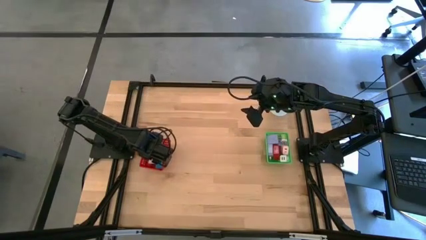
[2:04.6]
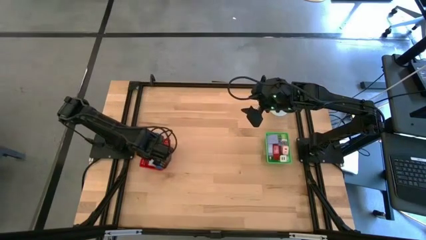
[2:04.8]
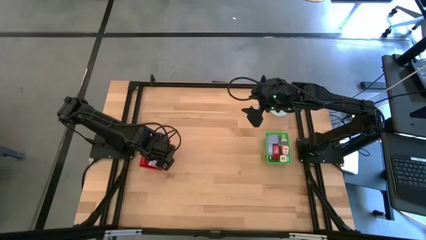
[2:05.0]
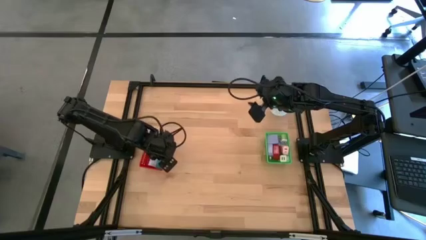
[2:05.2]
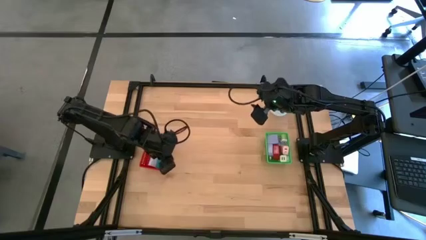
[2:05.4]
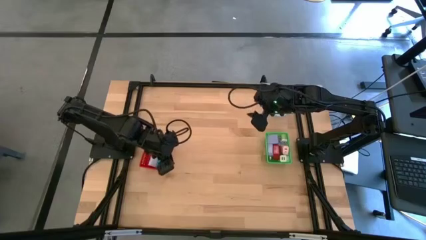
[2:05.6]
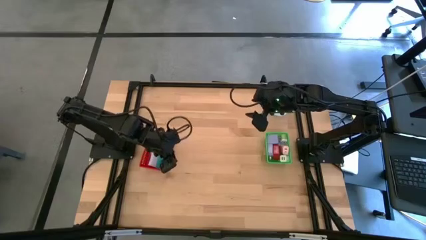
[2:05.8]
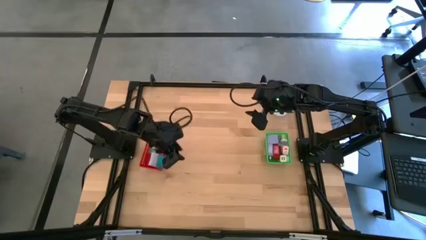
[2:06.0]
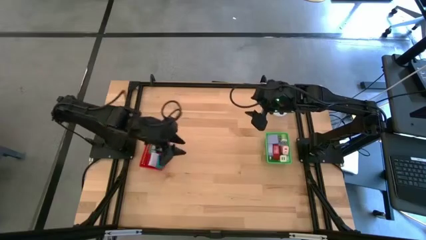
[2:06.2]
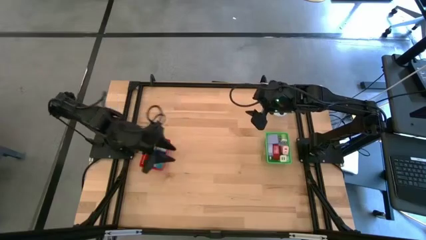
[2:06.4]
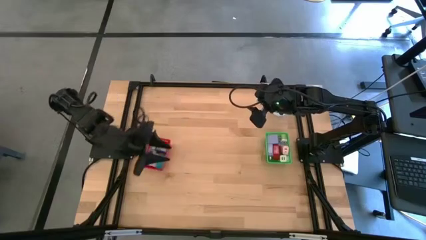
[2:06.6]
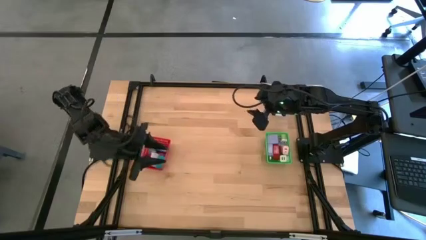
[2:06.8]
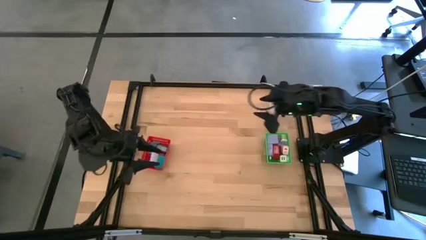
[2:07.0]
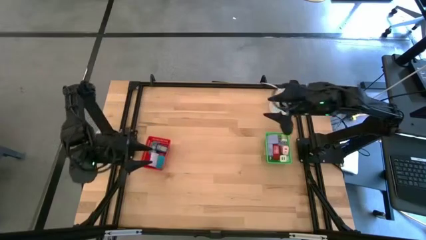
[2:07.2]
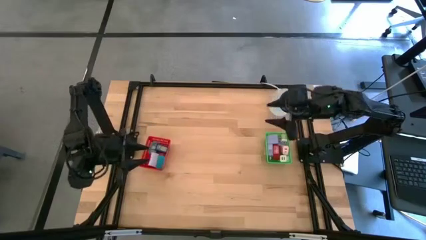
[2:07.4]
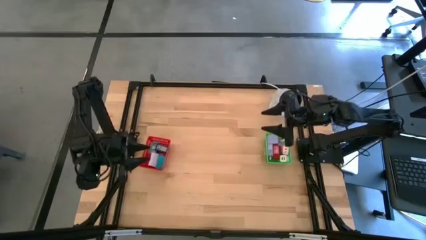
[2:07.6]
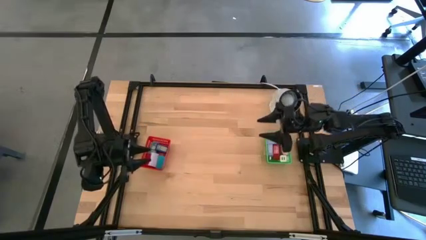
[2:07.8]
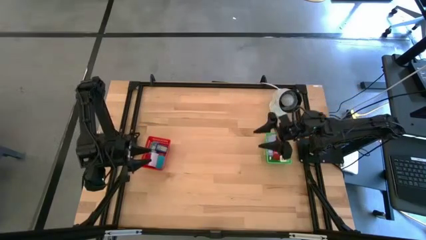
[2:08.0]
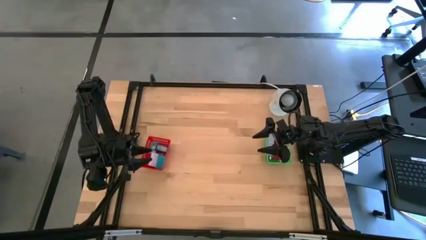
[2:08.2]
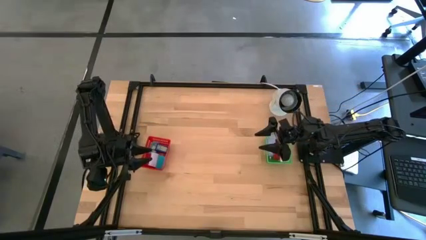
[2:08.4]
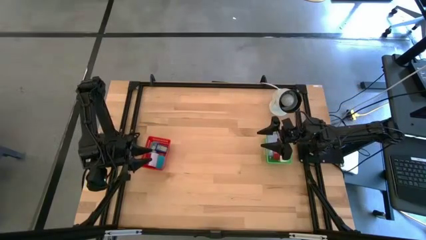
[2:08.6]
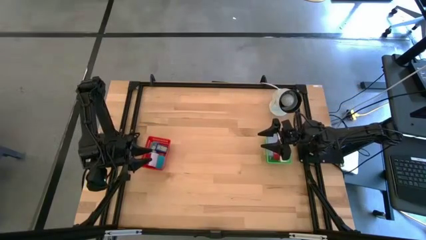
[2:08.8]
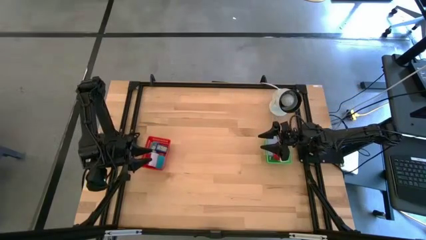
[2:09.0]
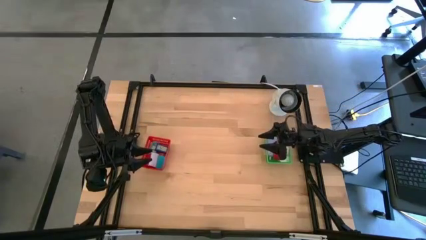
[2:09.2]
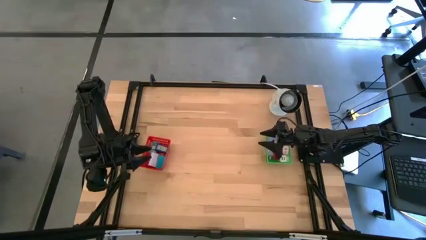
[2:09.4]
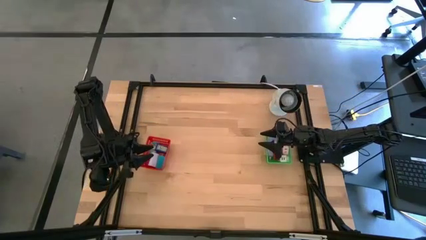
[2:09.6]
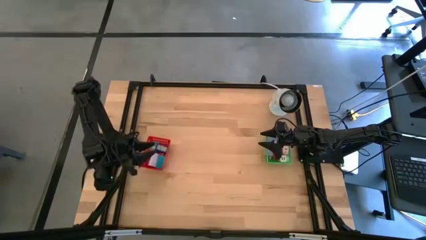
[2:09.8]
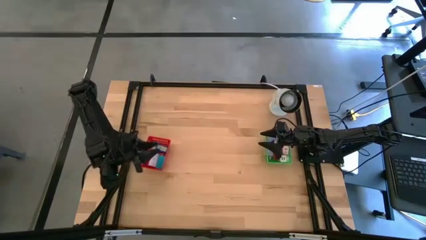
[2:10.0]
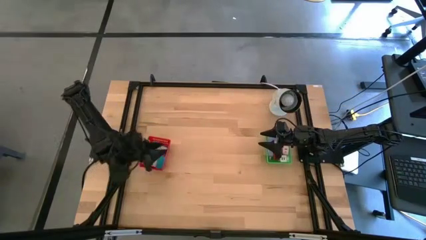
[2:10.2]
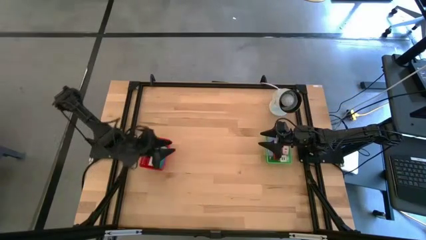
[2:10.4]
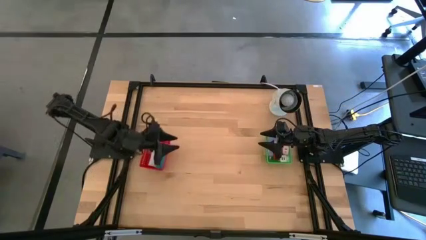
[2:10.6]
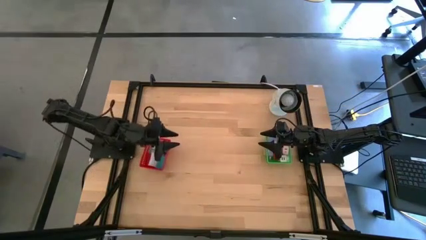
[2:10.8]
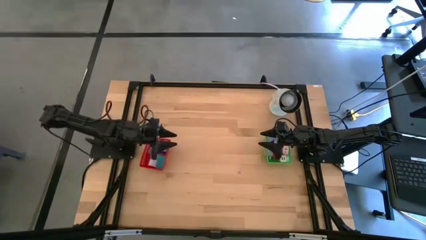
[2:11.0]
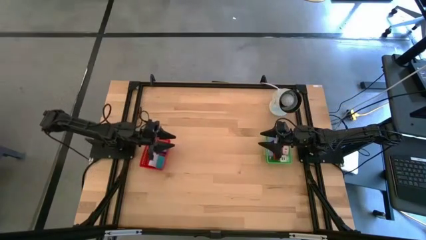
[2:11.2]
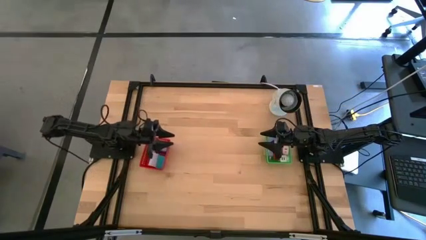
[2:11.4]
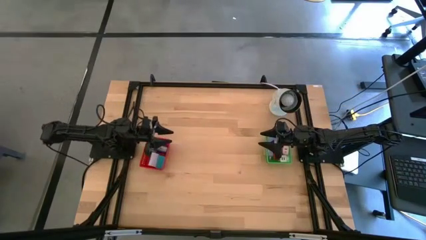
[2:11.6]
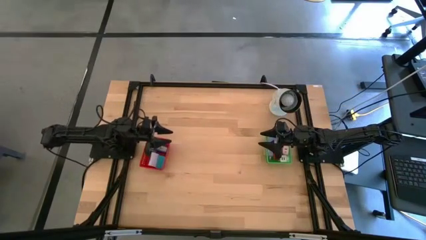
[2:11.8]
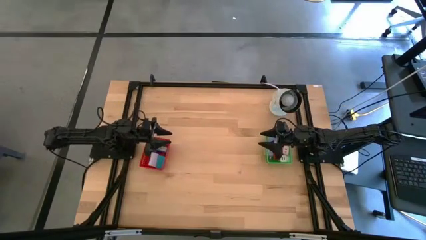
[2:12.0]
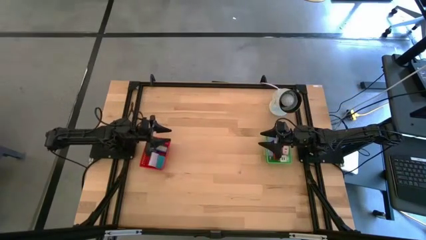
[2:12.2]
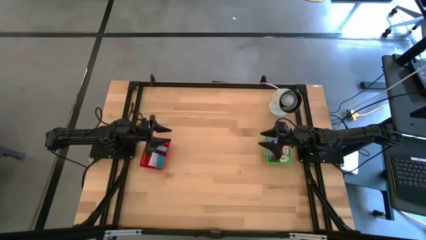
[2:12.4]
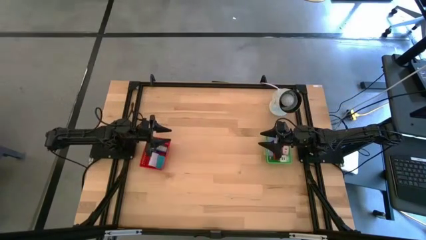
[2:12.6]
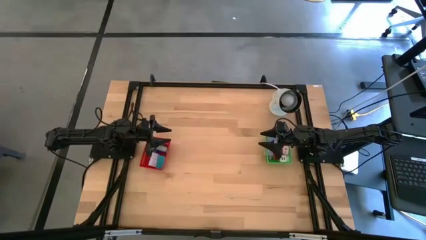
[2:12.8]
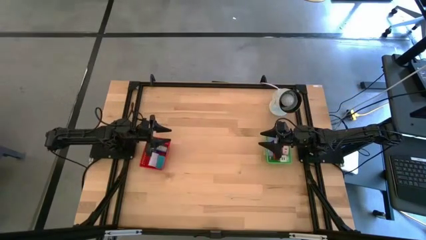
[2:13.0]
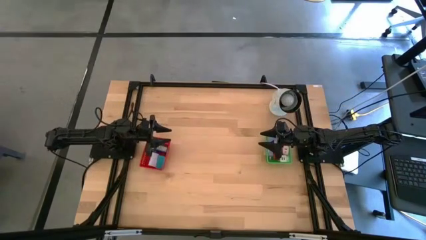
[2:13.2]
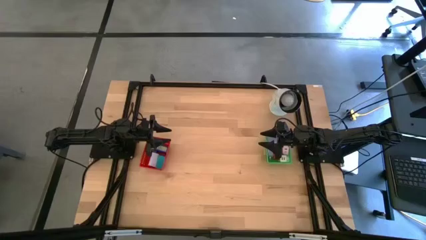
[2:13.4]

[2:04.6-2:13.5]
Task: Pick & Place Office items
Return to Home Position

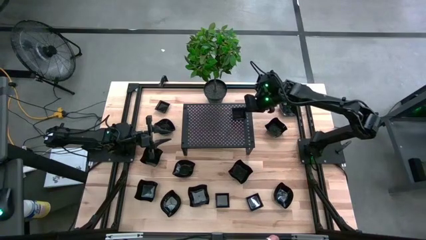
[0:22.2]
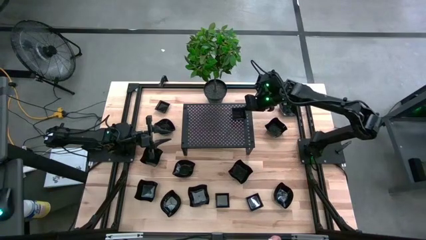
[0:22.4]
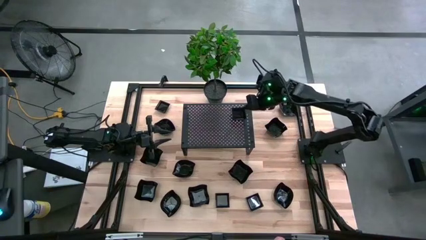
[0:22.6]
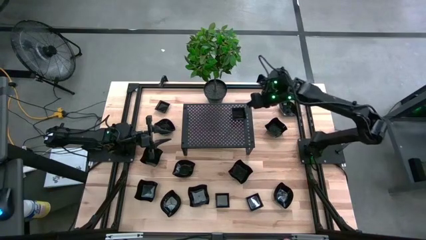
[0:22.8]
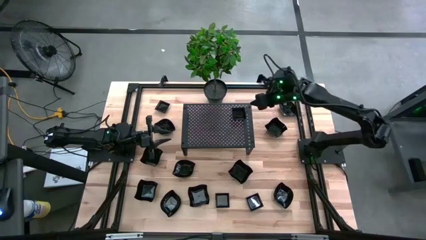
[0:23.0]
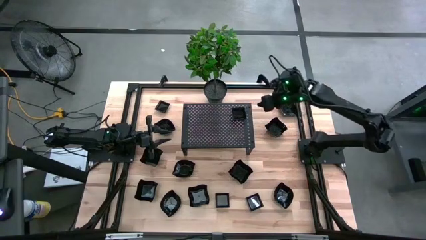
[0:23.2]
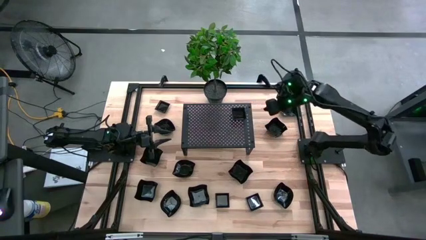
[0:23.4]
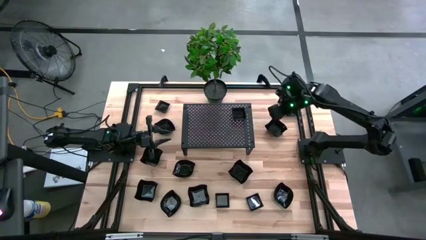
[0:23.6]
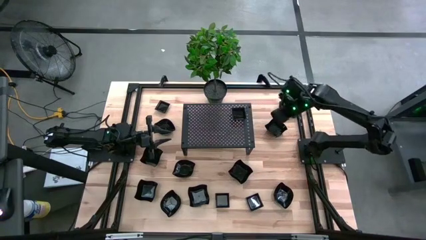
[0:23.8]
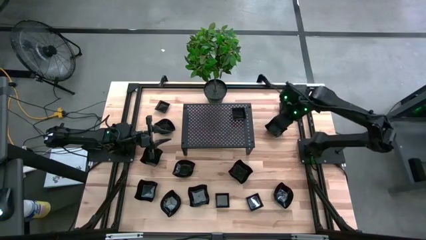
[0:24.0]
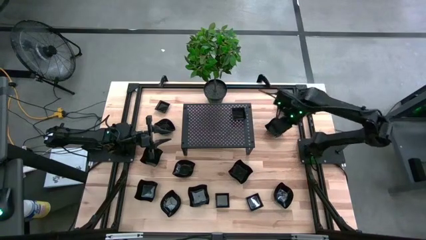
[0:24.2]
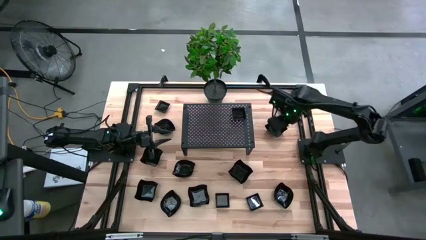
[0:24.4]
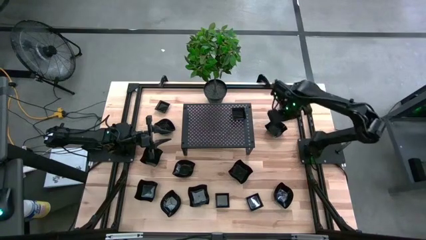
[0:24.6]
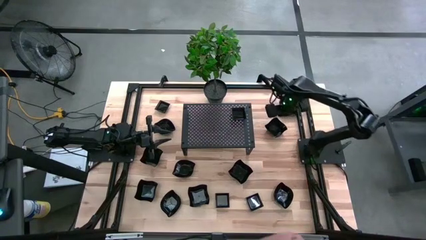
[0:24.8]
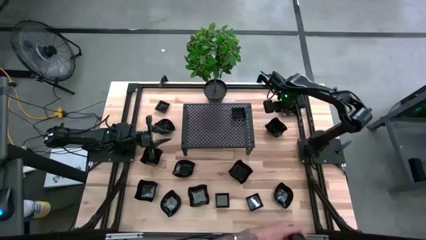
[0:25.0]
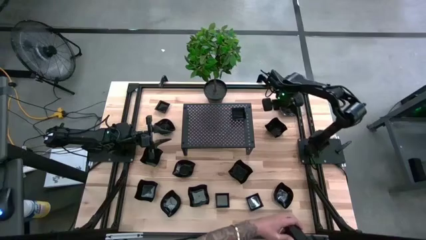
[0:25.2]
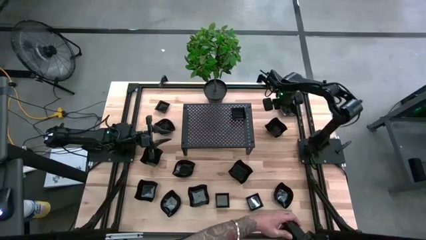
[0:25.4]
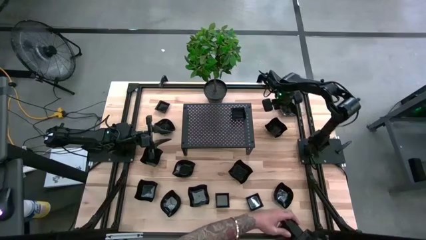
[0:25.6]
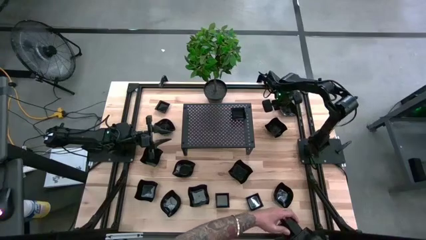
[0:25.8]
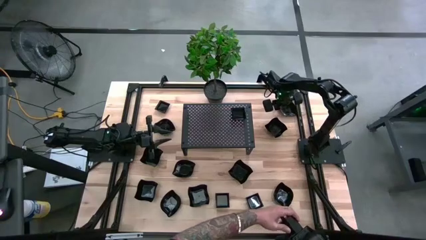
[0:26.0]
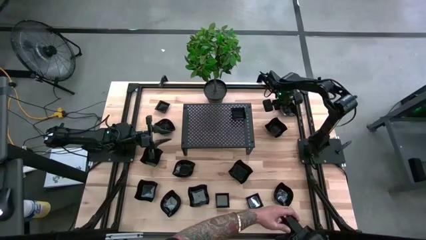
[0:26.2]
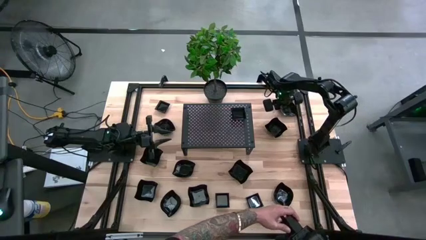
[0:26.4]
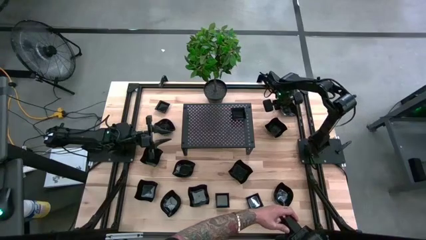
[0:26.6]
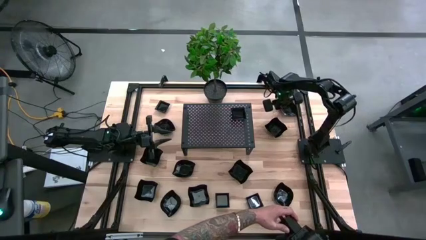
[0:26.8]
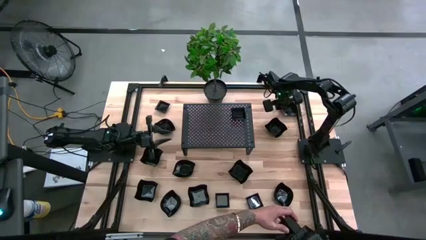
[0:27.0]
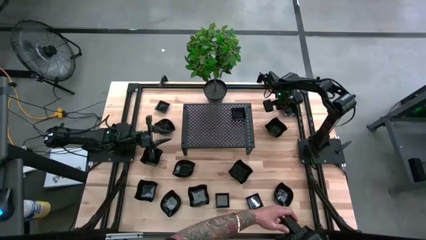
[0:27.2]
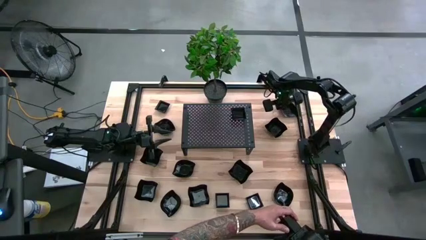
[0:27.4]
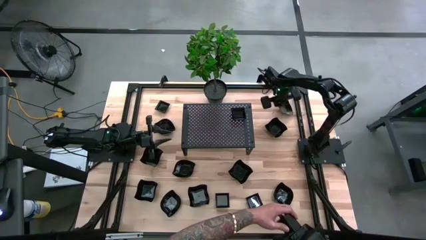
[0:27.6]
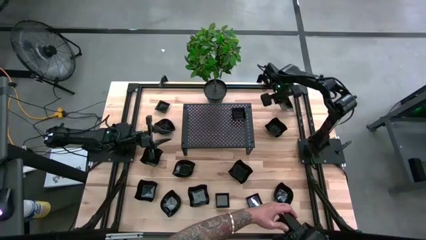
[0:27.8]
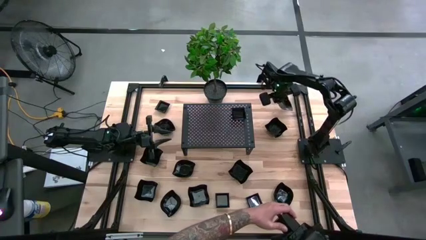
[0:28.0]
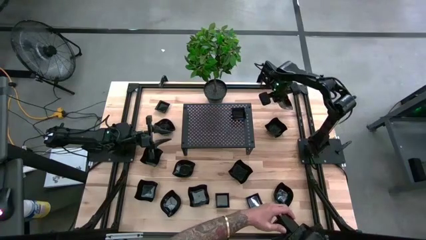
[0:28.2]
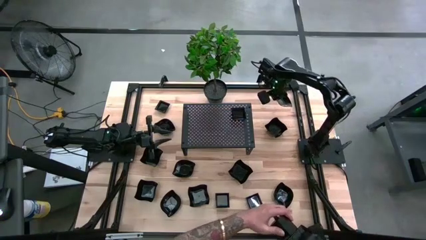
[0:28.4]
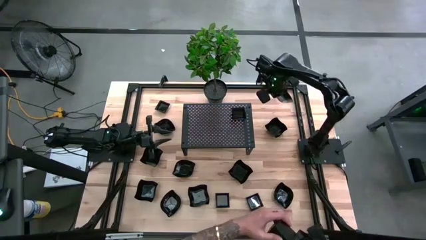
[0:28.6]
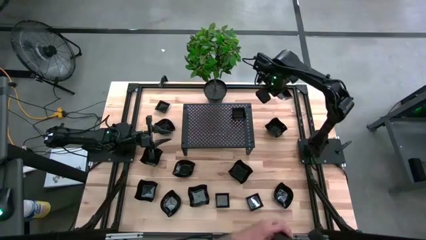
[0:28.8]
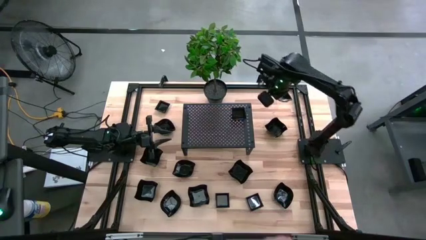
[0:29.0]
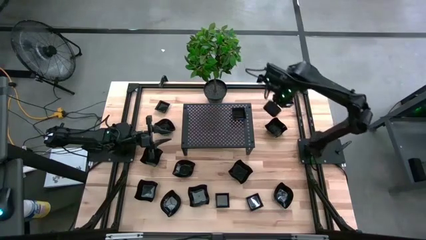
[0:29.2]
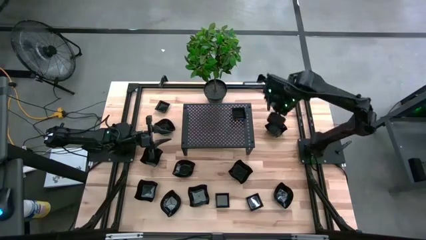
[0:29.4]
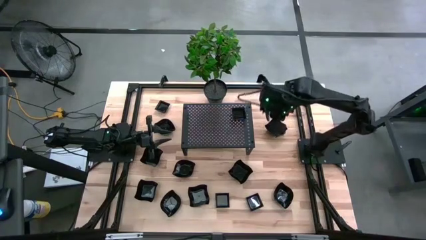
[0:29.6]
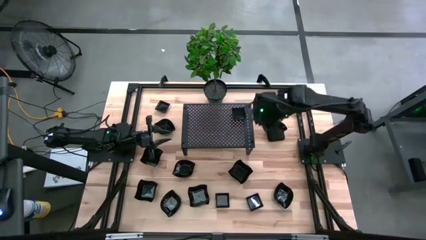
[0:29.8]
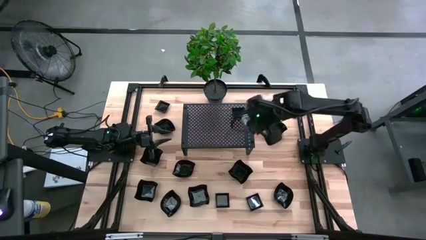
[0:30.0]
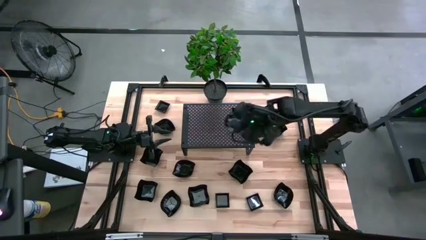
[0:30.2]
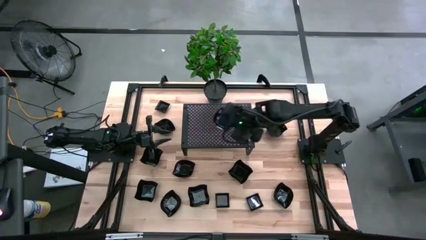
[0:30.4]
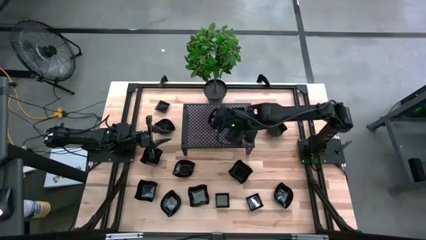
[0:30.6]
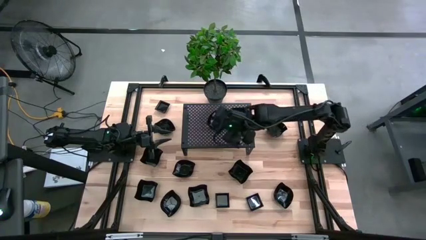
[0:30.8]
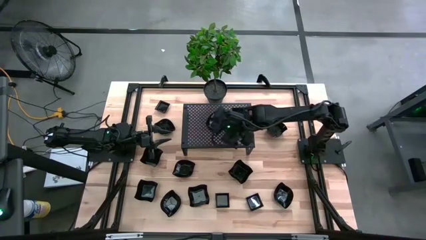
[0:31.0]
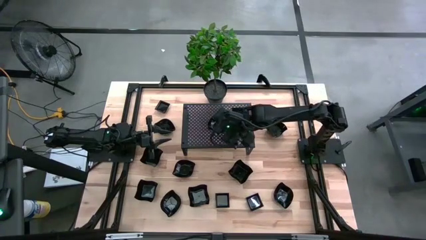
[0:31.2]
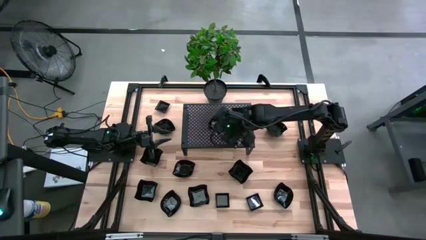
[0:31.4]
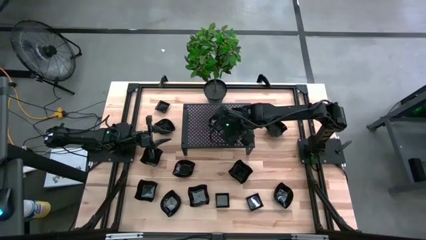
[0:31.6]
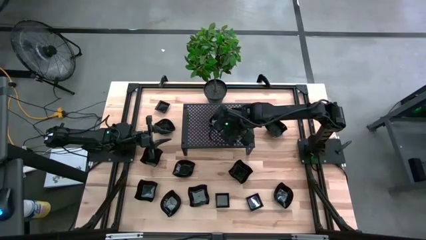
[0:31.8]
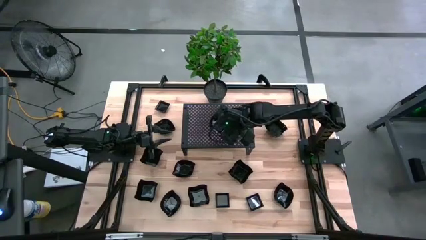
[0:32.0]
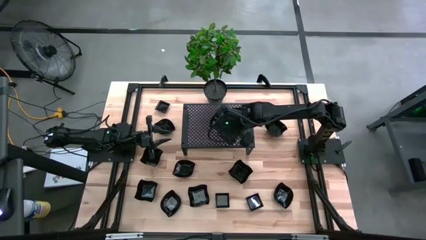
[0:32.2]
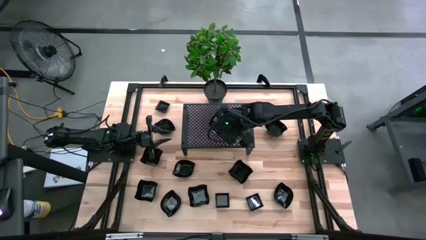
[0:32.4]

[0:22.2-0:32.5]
Task: Pick & Place Mini shaped plates
Put the black leaf-shaped plate on the shelf
